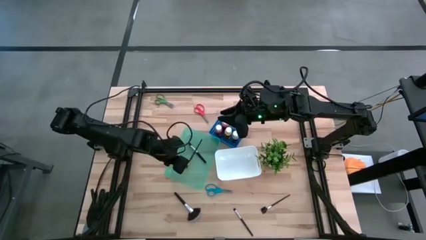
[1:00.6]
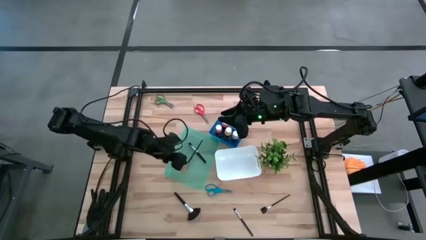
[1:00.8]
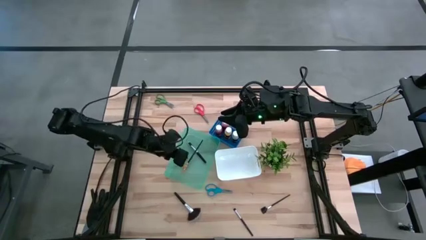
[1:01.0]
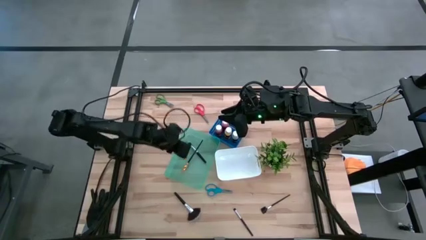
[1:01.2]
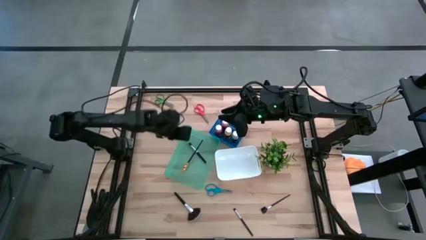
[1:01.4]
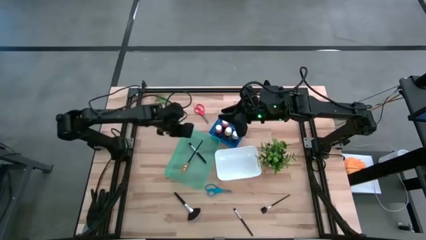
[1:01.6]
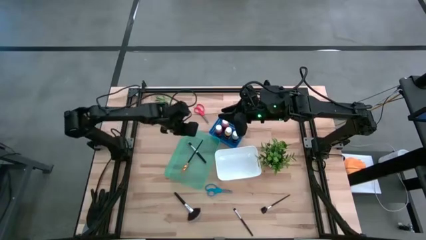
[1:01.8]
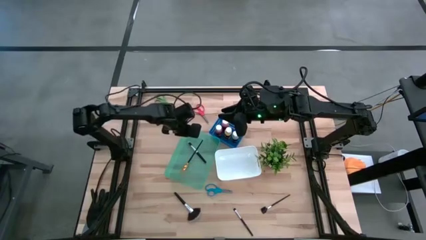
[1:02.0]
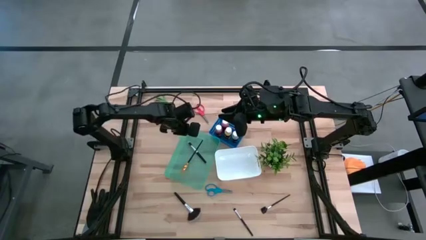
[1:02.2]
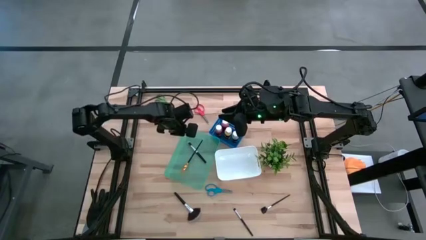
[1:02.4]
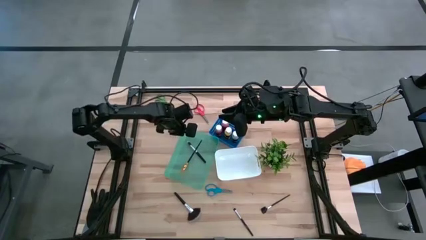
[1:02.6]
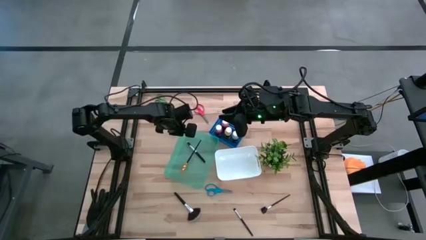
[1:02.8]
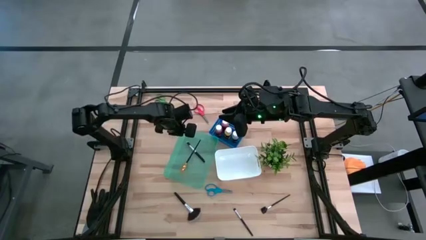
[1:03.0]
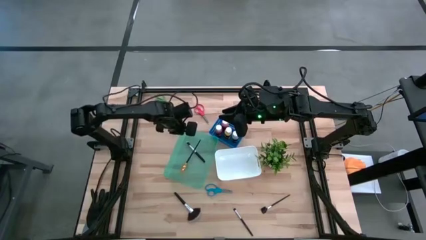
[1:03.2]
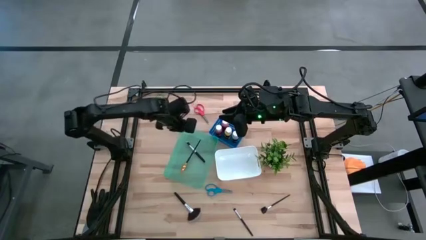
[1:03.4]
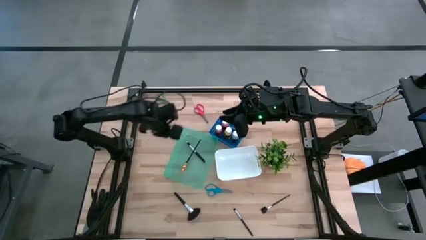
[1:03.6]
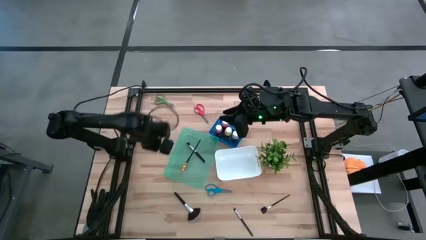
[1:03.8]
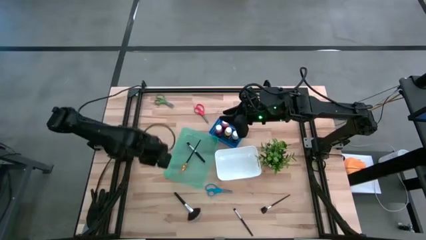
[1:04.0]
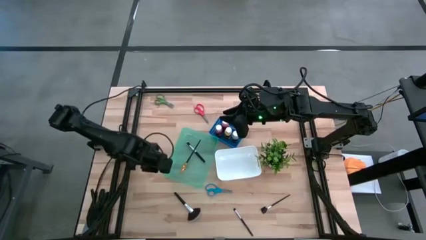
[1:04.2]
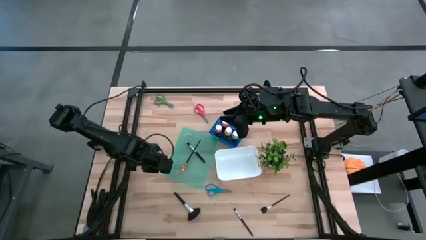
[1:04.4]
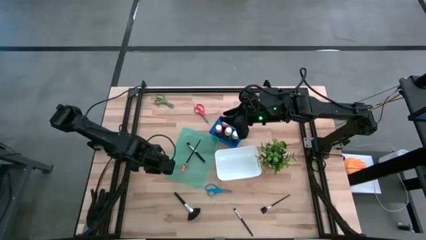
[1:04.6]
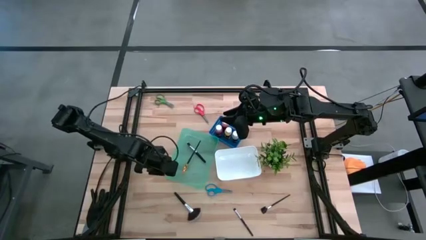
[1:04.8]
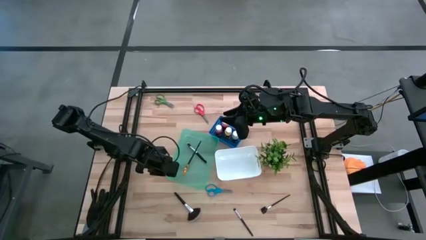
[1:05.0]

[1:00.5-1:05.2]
Task: Pick & Place Paint Supplies
Adjust the green bin

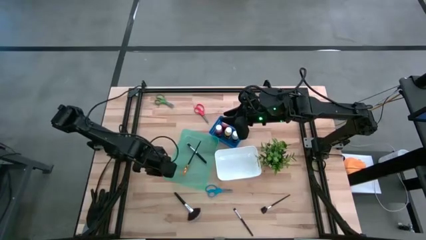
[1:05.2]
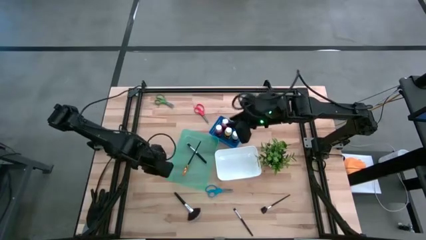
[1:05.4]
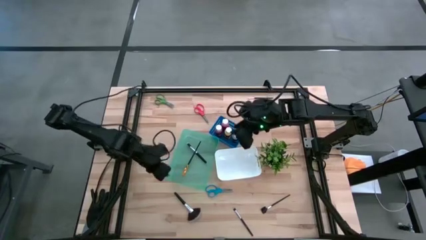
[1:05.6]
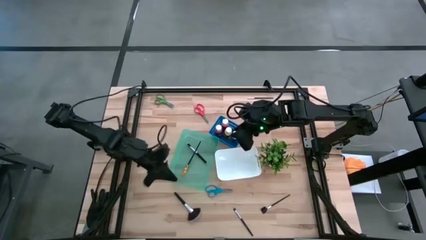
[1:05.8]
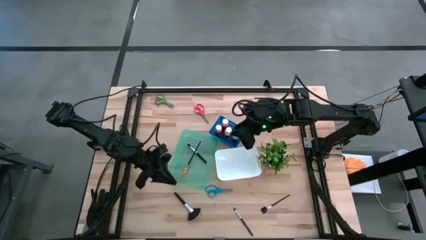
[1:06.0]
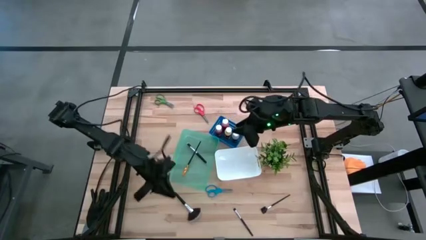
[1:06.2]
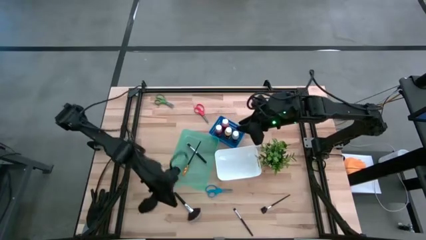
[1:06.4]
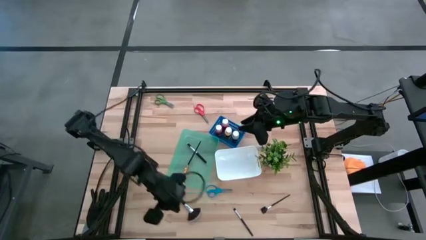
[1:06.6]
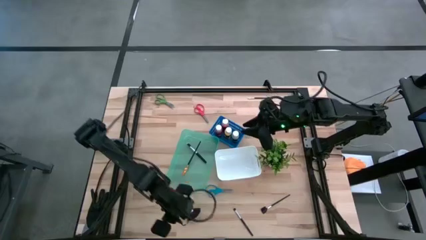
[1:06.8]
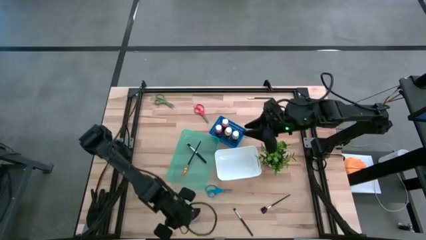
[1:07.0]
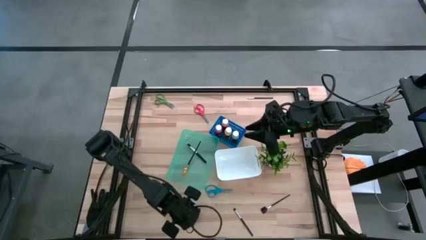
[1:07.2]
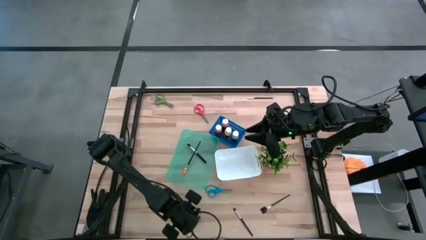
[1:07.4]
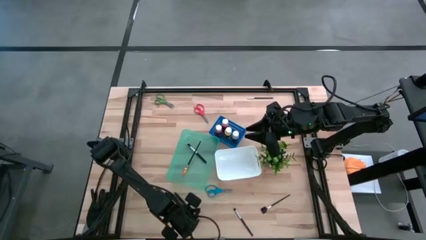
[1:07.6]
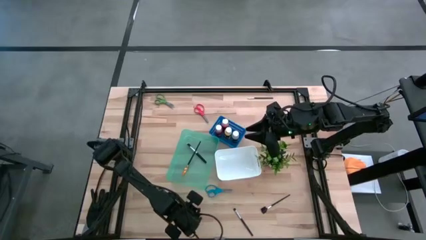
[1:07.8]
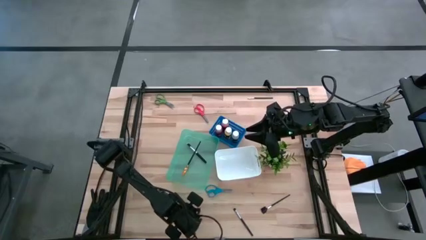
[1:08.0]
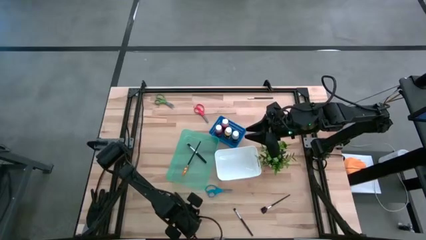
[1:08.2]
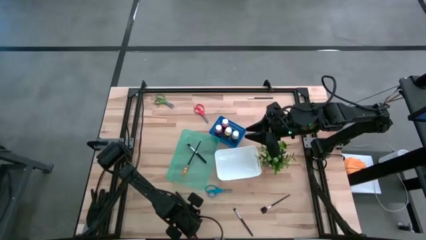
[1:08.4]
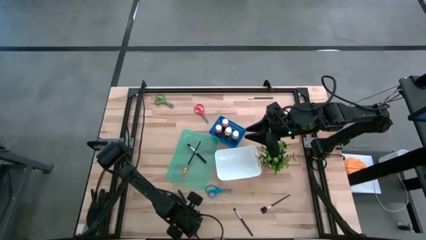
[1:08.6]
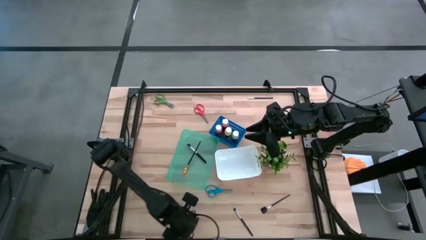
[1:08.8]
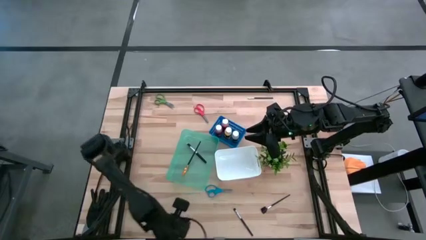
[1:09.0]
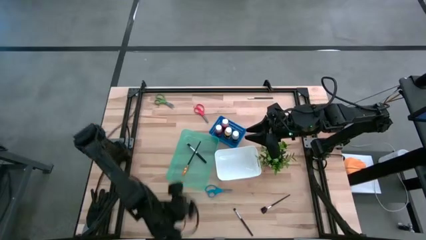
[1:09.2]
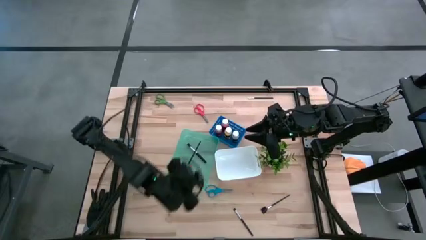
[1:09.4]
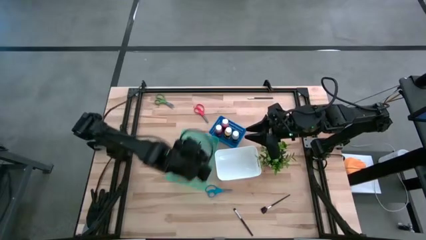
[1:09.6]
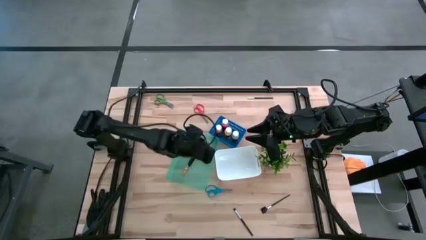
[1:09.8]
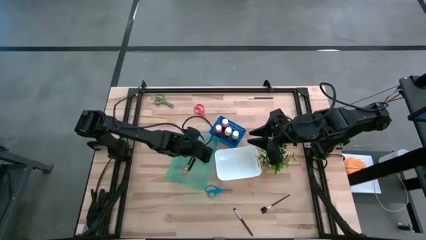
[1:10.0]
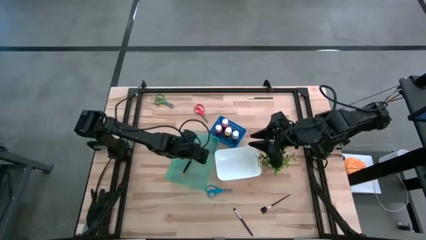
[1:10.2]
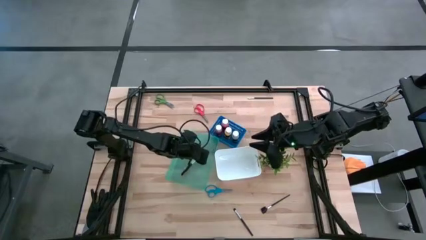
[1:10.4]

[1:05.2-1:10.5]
Put the black highlighter brush into the green bin

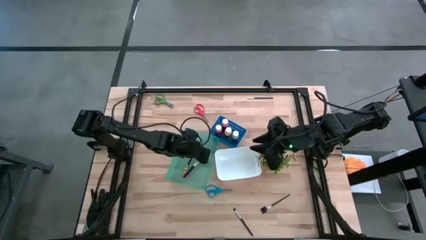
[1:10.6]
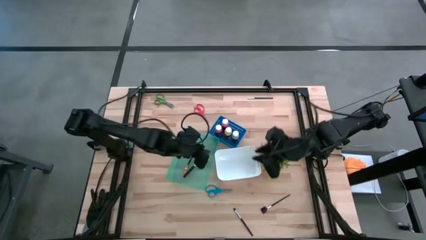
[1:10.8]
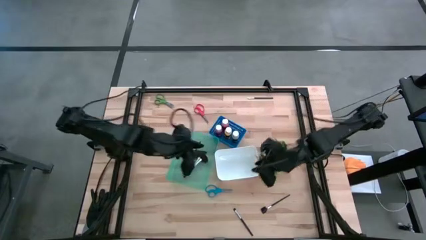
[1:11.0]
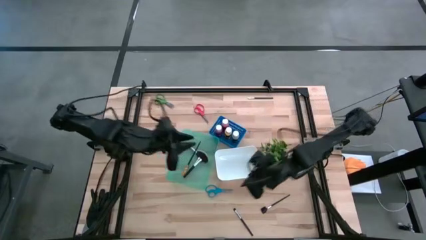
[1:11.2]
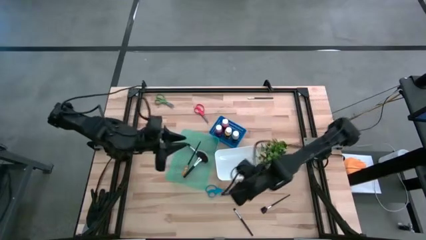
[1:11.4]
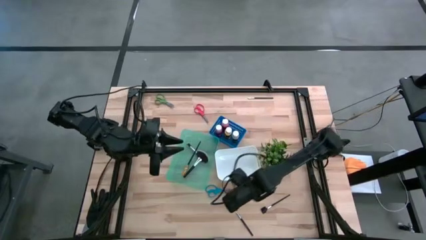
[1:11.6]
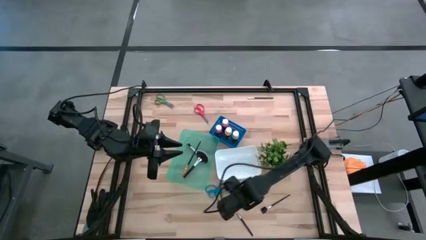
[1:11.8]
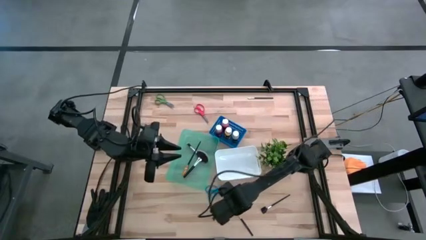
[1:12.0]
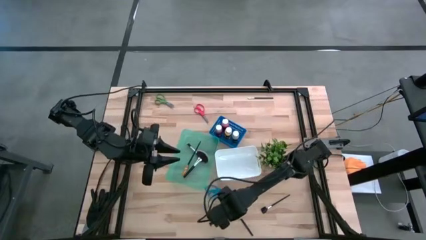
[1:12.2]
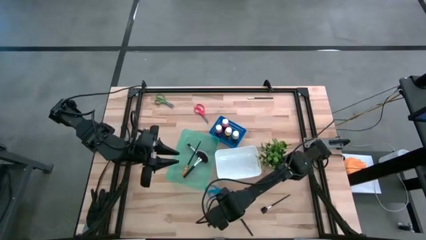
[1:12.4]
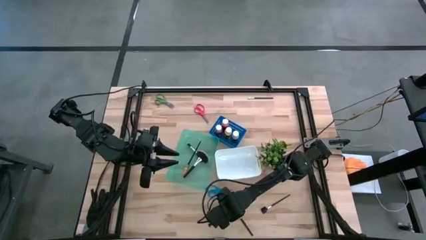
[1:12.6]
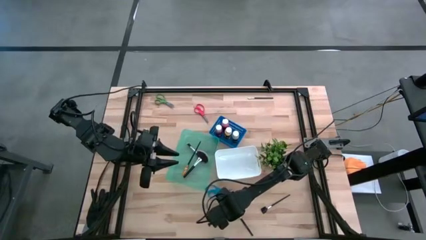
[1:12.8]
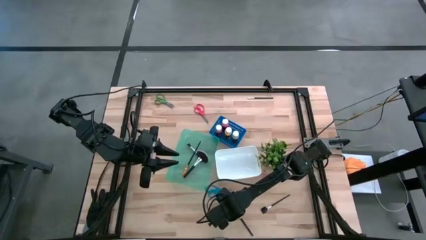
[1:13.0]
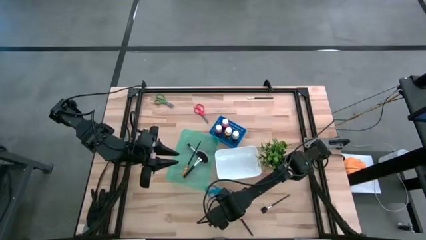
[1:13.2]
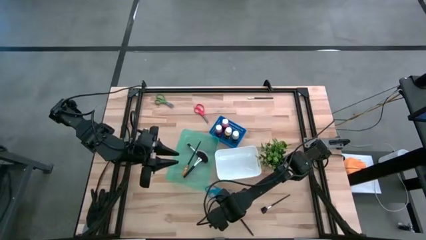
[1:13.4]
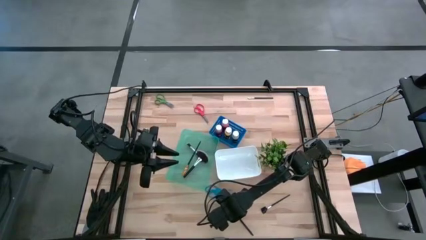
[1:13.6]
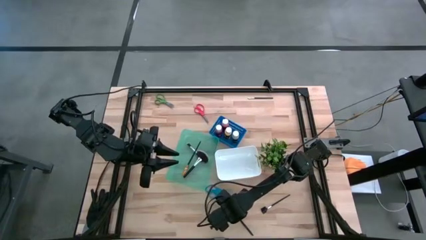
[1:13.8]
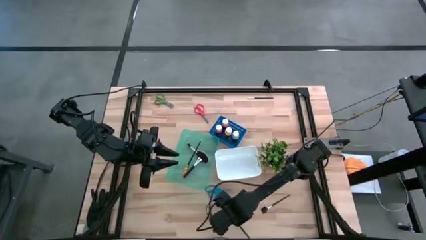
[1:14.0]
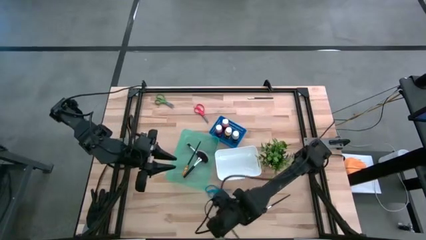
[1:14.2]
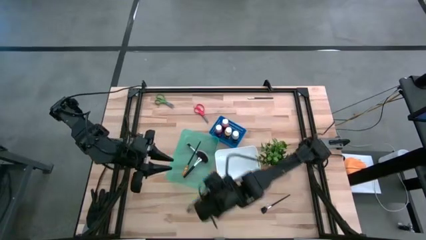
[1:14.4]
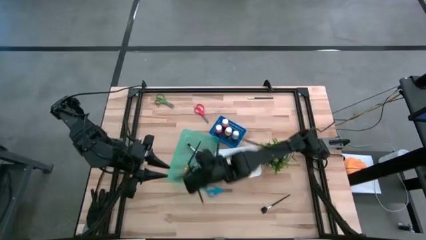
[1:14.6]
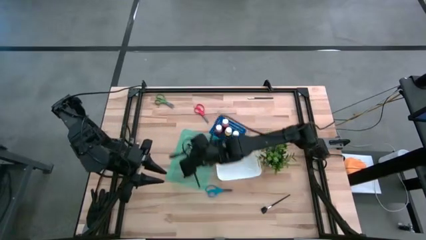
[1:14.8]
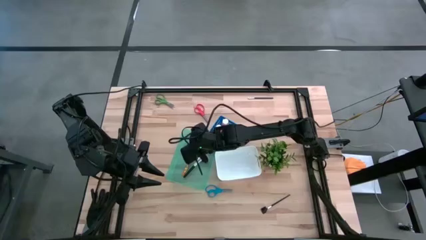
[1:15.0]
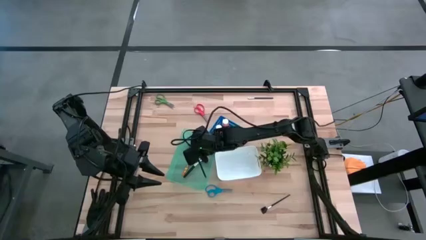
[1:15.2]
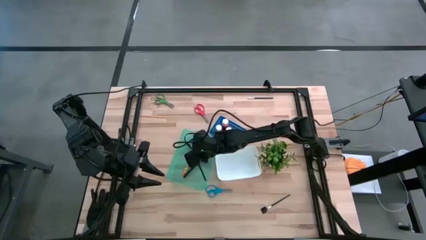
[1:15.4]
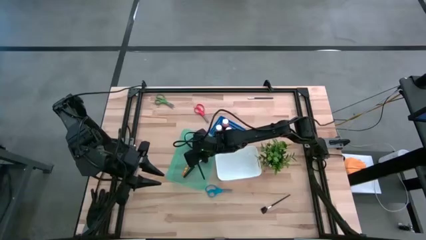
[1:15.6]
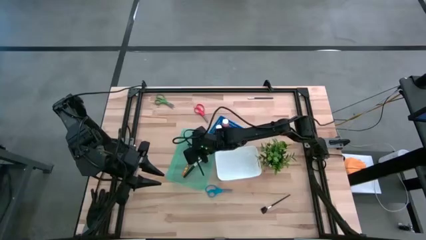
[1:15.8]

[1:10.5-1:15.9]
Put the black eyeshadow brush into the green bin

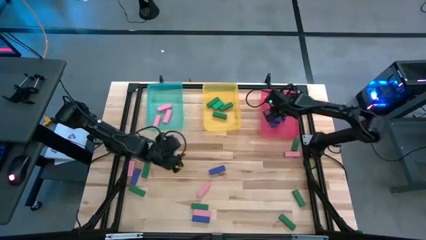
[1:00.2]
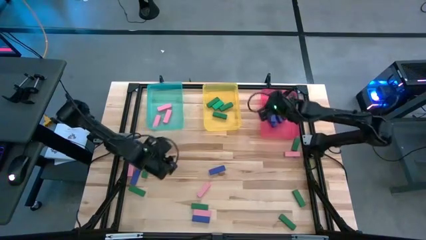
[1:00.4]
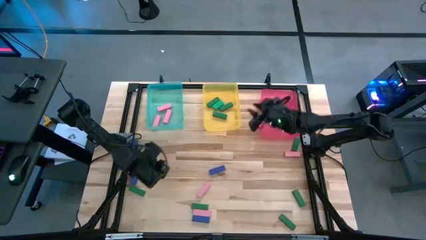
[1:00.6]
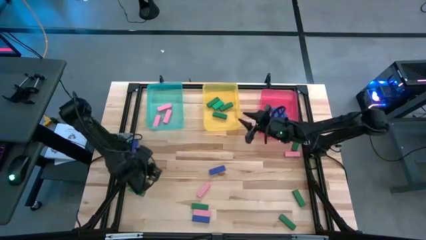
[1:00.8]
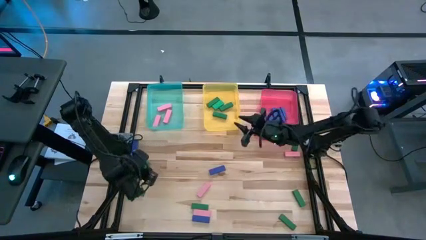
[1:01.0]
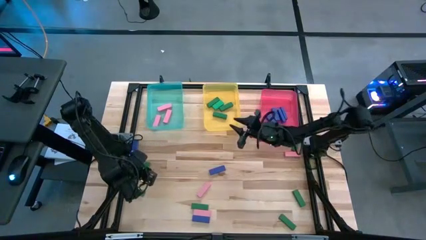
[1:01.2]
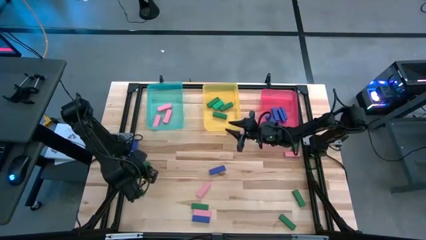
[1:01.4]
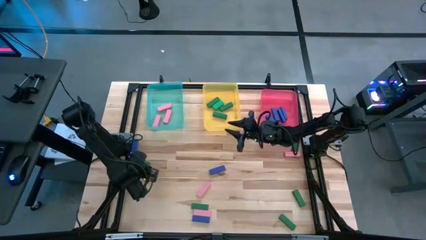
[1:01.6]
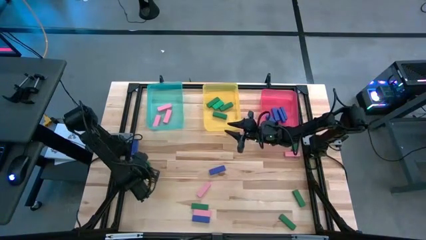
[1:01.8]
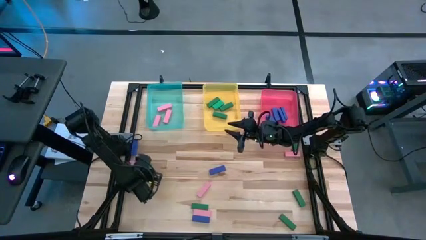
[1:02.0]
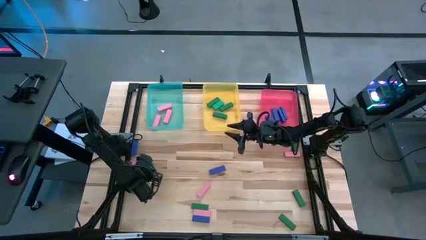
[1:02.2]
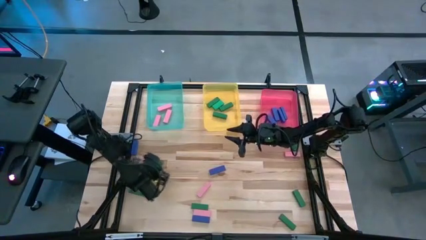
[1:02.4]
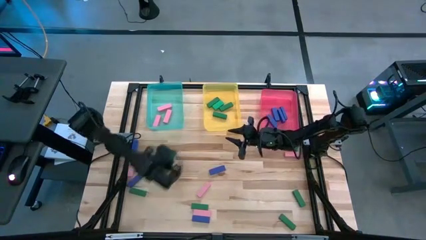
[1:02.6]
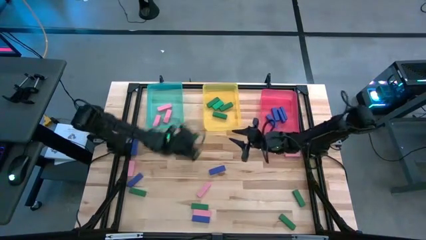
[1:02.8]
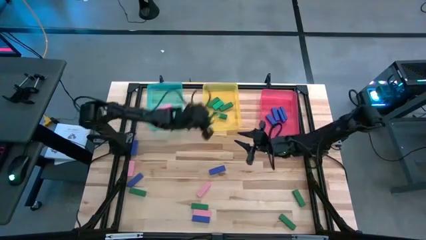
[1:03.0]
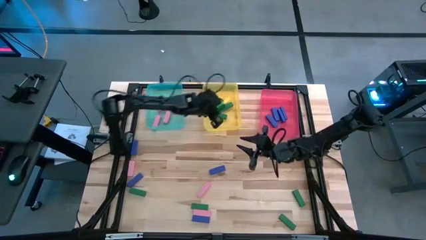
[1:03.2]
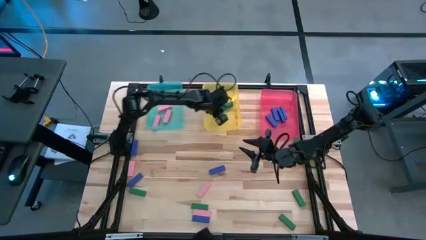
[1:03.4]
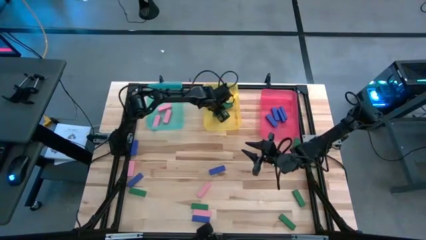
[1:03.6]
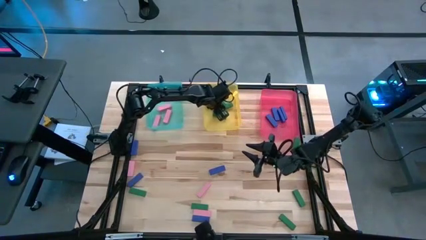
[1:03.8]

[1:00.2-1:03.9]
Task: Sort blocks
Put the green wooden block into the yellow bin
